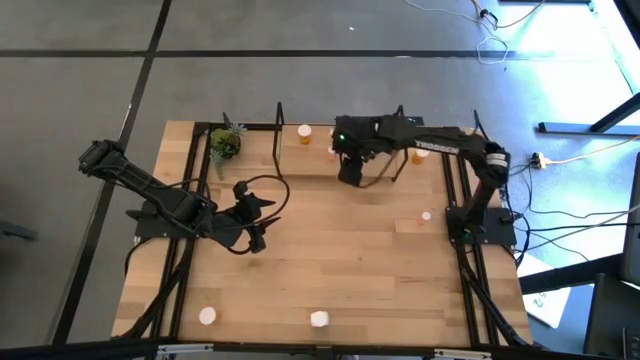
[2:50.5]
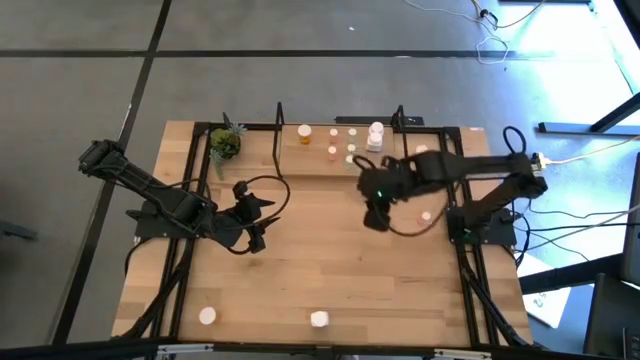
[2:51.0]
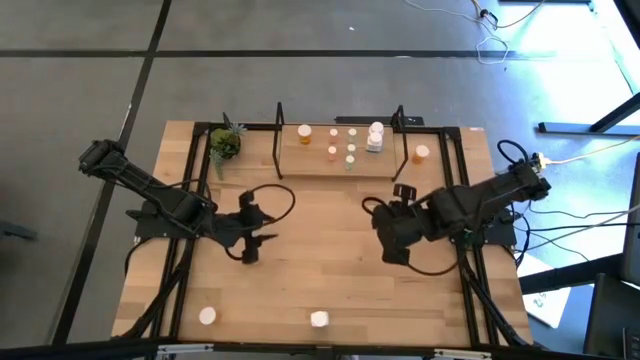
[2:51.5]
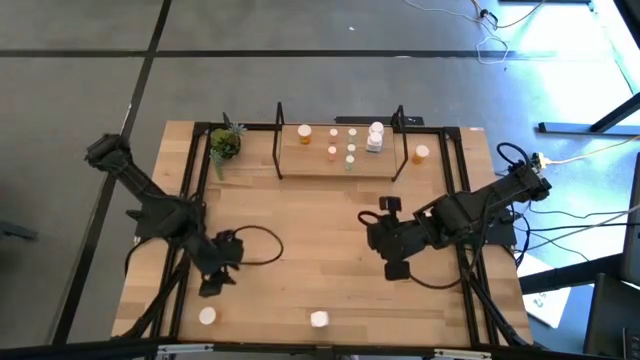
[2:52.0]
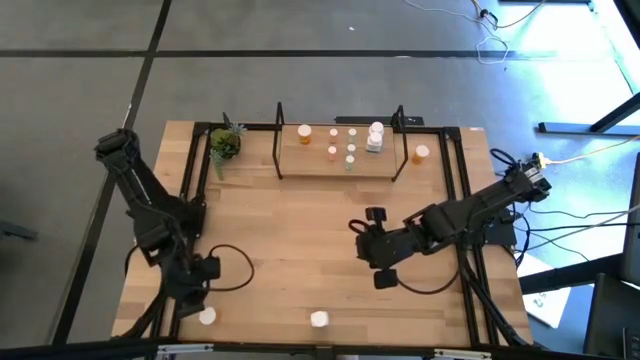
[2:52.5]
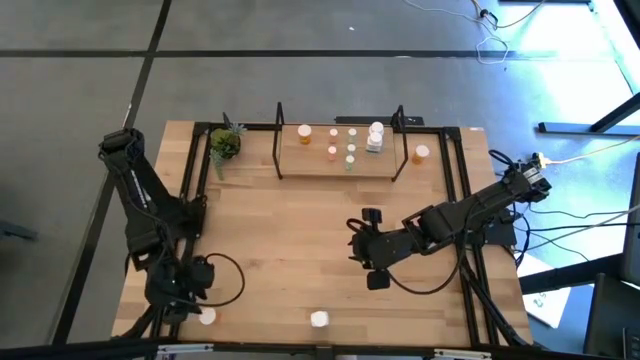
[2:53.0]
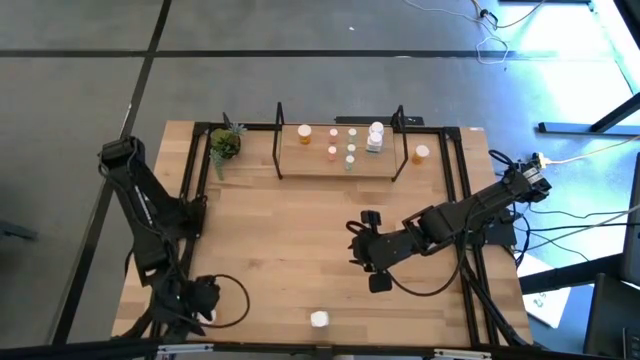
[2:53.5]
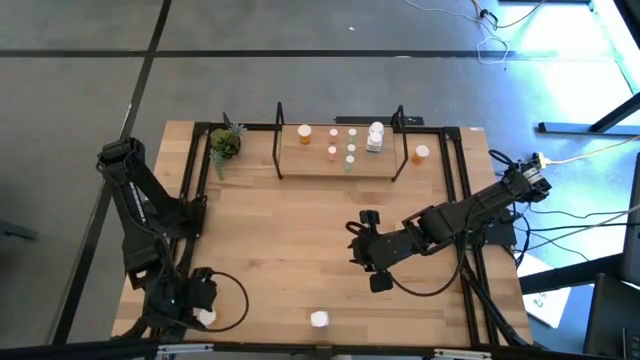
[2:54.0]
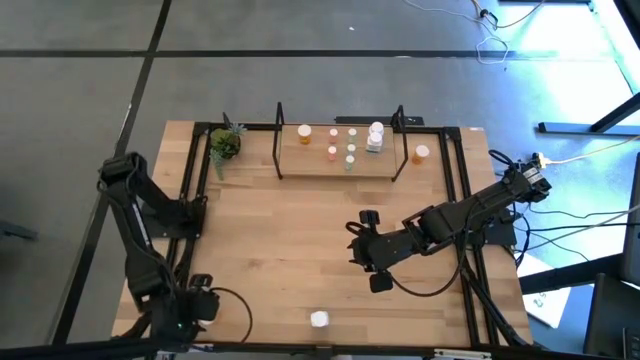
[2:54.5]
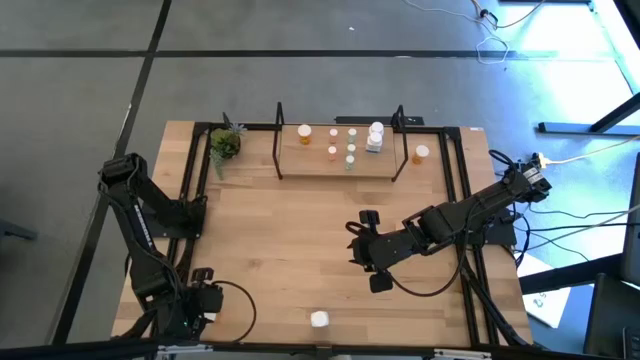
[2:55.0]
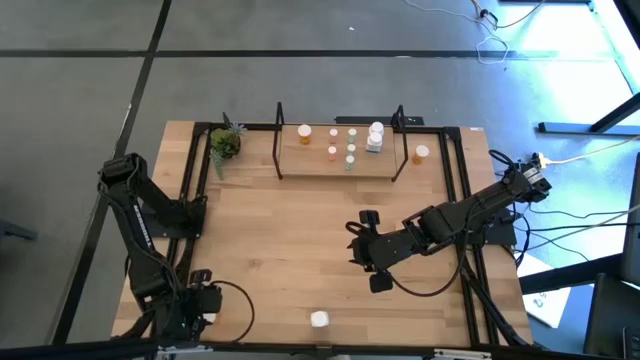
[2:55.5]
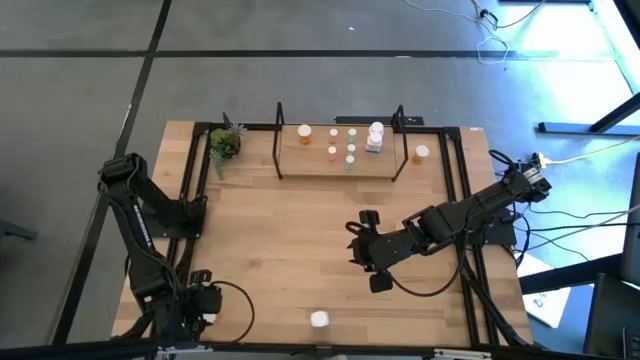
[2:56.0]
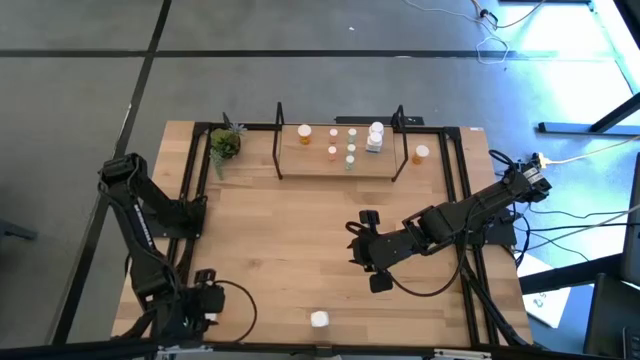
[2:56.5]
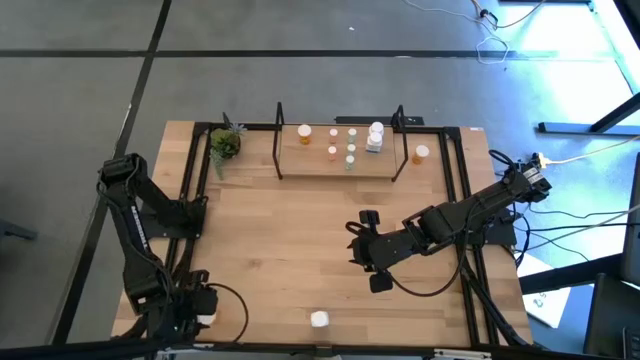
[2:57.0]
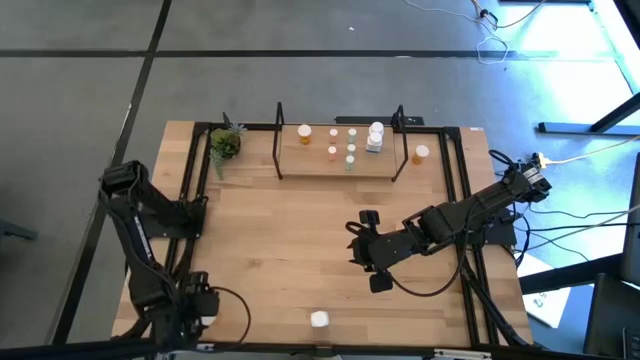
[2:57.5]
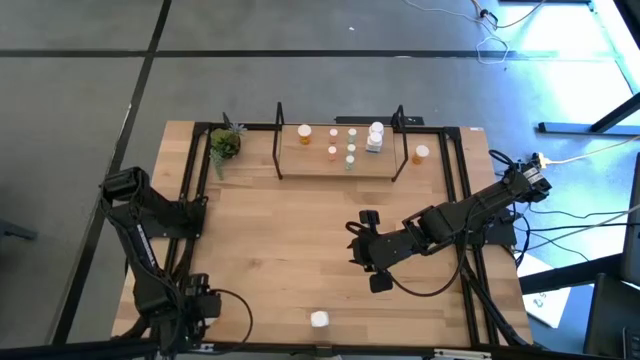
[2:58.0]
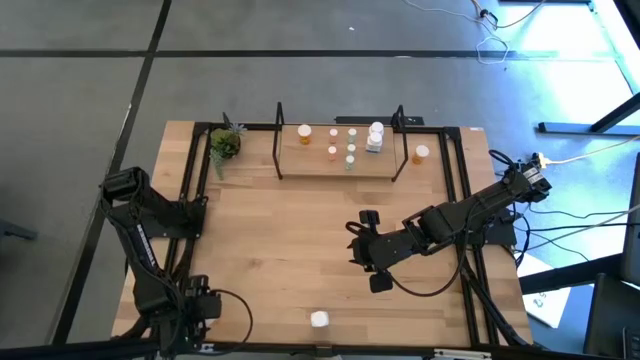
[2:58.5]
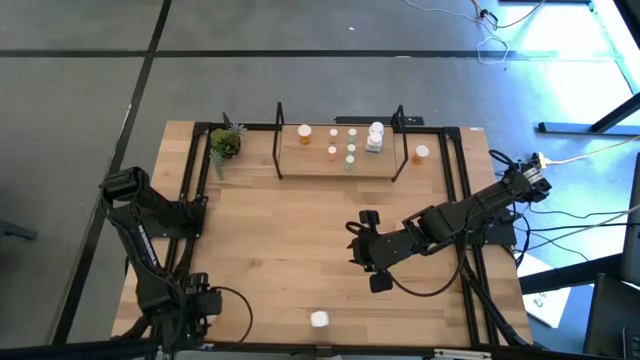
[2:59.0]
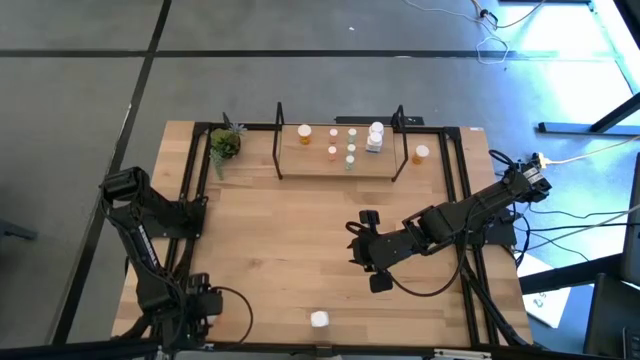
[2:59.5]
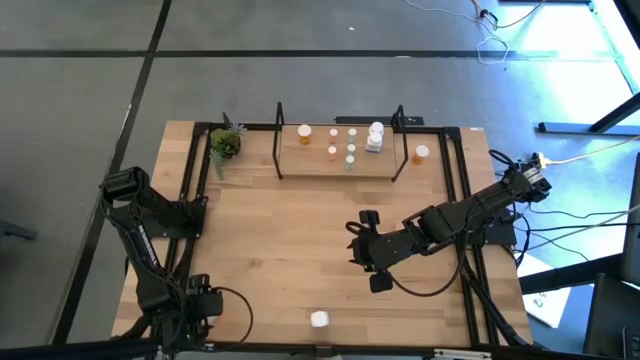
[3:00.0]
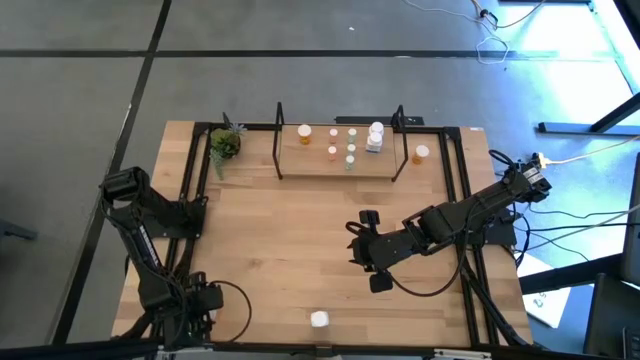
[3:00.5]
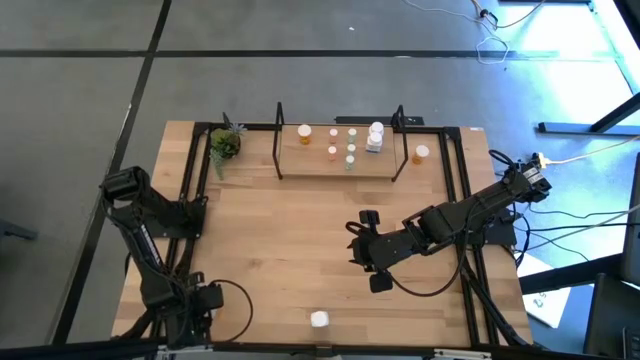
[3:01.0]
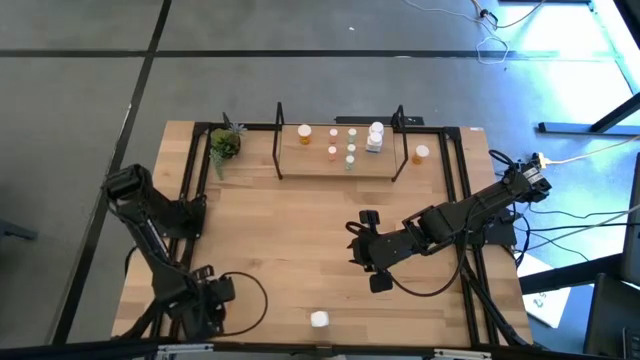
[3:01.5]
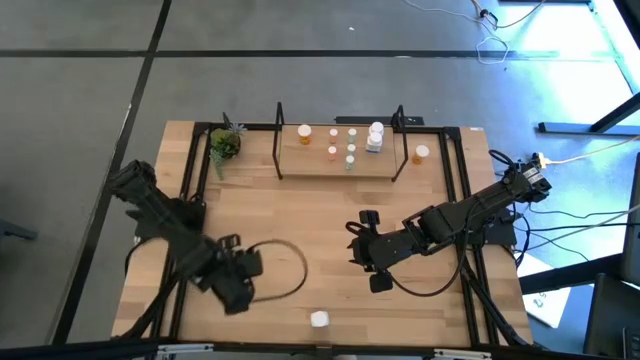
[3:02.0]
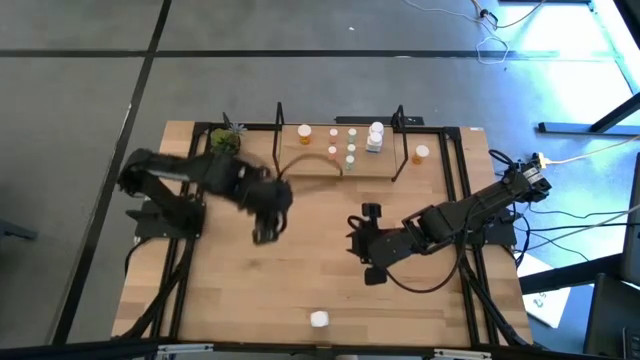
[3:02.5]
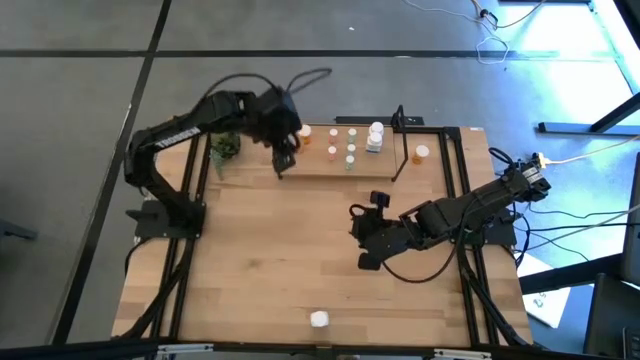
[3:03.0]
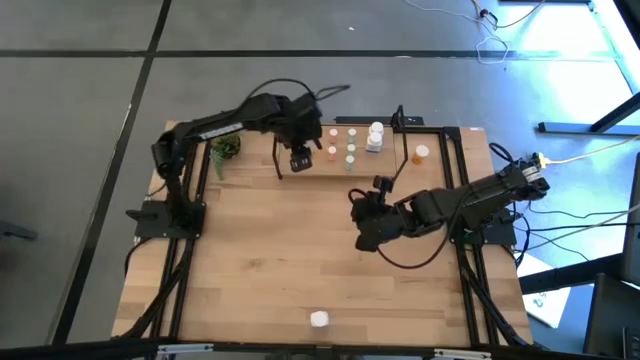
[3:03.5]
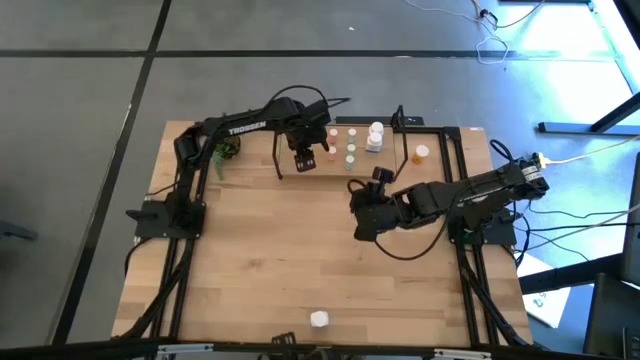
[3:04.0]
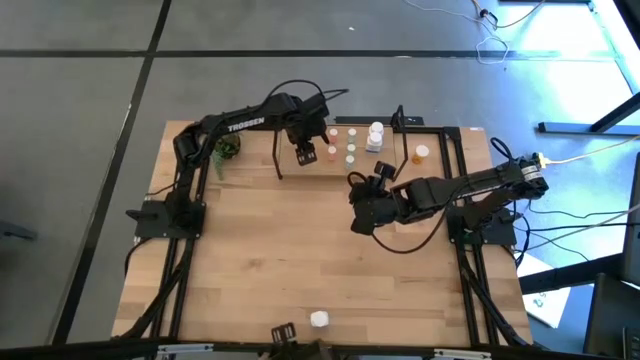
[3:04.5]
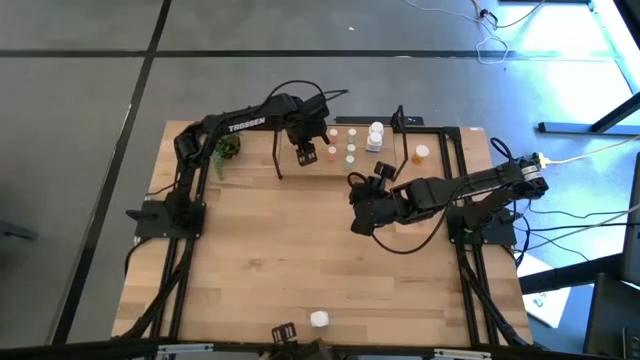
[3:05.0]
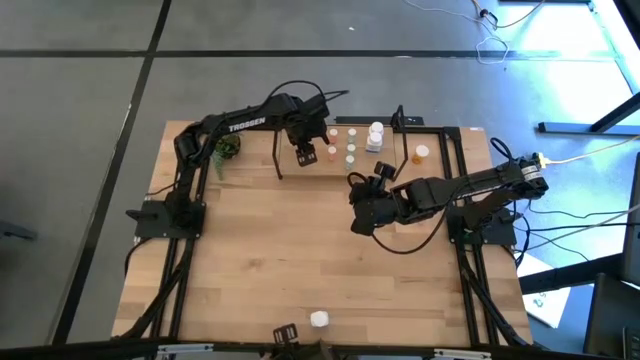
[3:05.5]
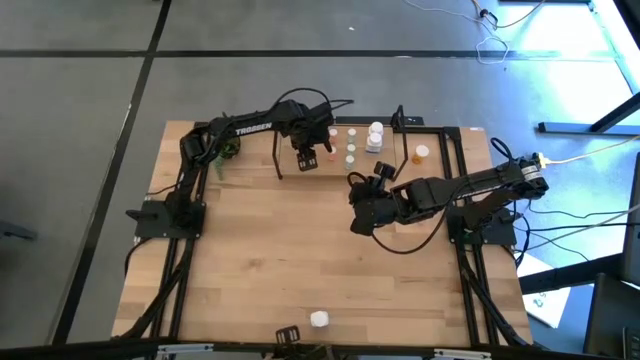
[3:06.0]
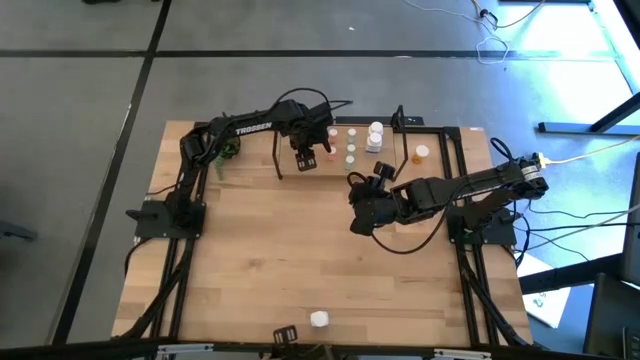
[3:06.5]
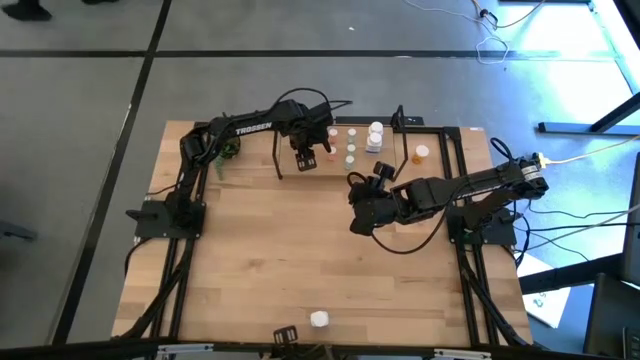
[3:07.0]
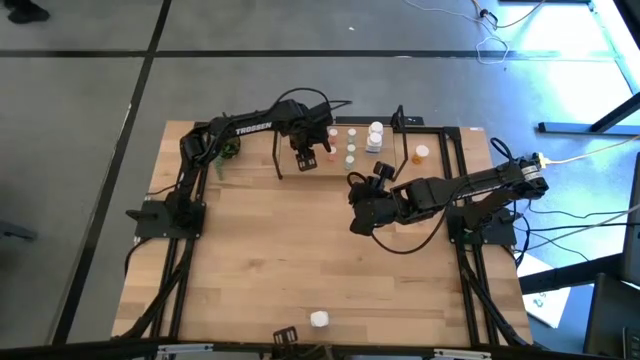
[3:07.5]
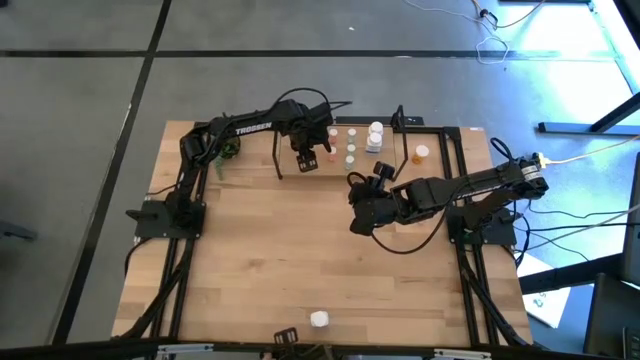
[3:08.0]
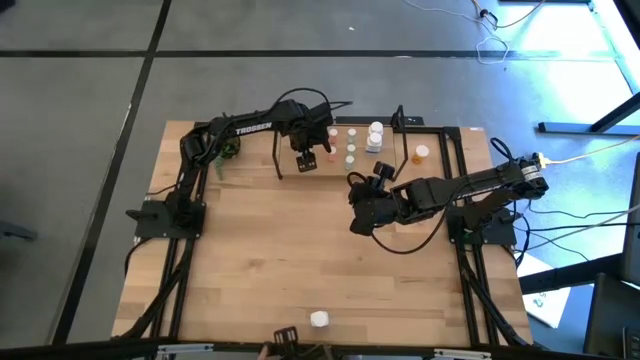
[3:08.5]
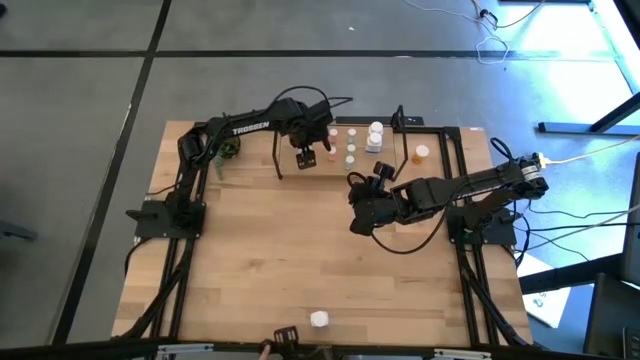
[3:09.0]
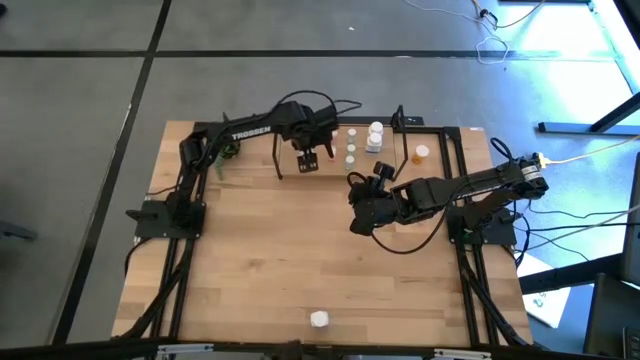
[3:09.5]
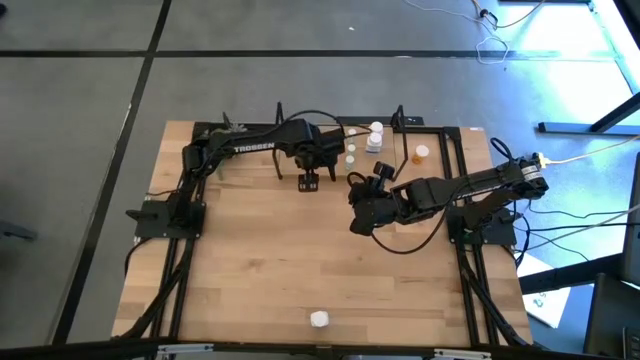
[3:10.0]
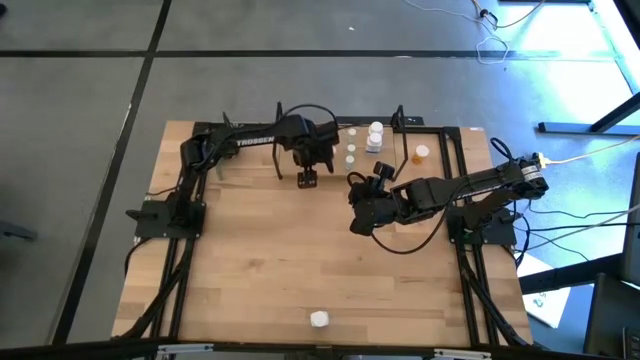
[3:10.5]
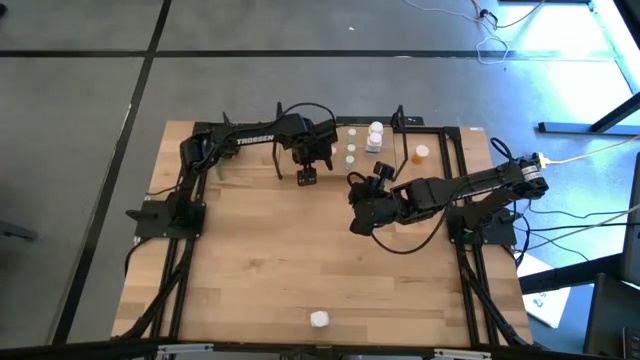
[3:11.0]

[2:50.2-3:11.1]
Task: Pick and place medicine bottles onto shelf by color
Put the bottom orange pill bottle on the shelf aligned with the orange bottles
